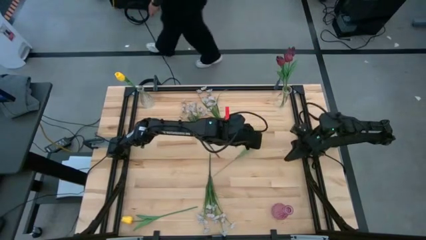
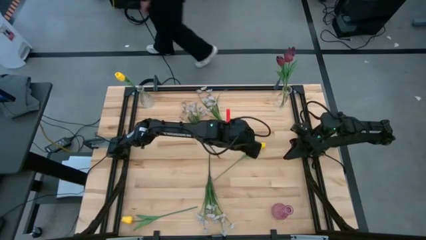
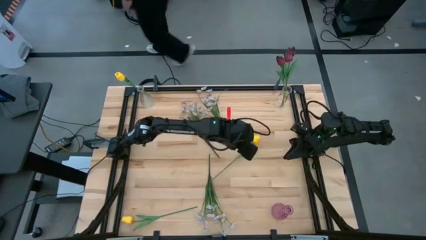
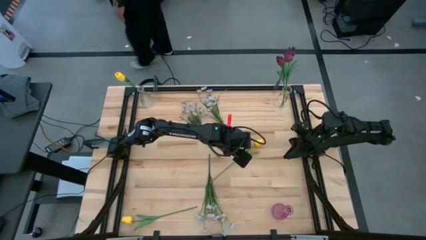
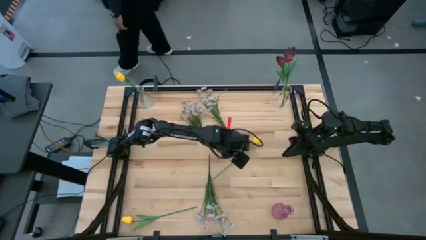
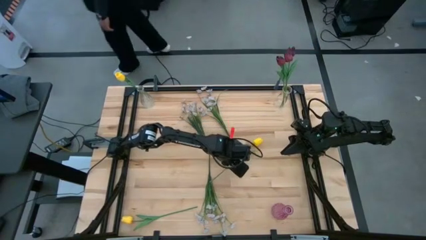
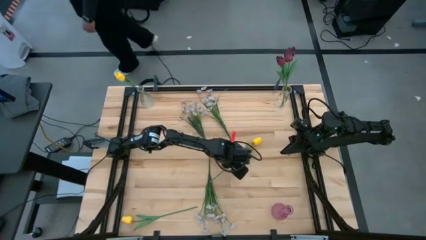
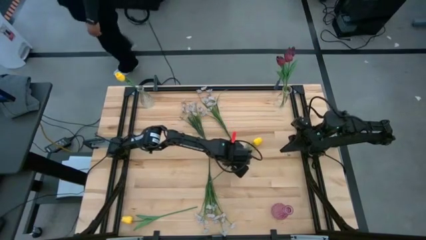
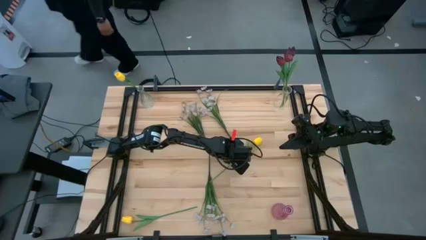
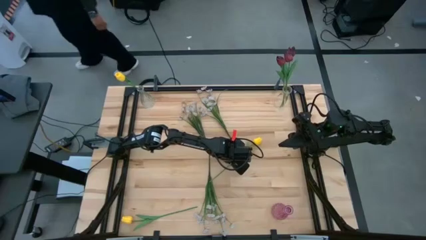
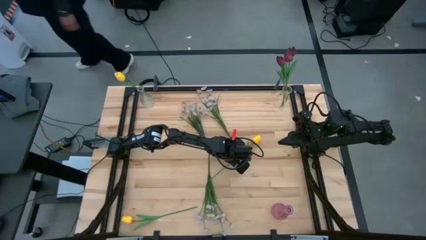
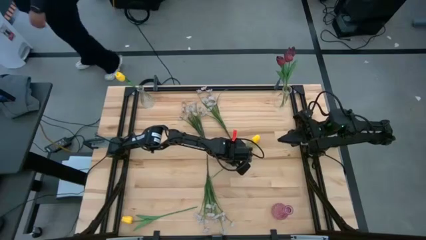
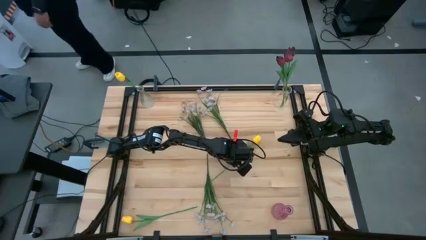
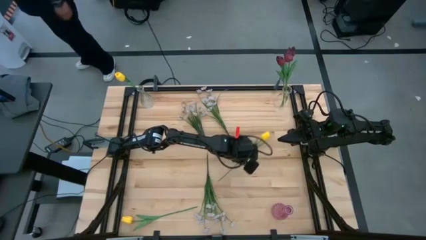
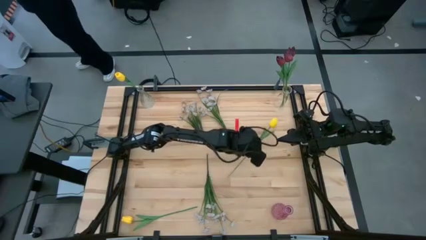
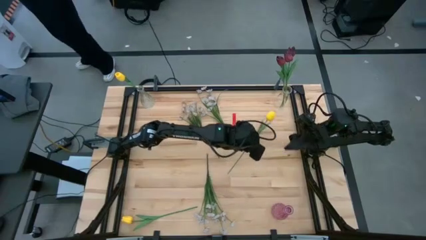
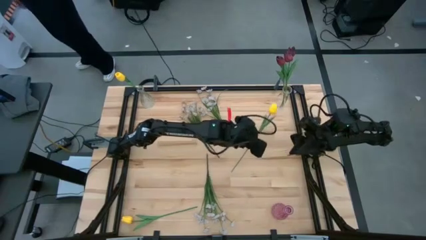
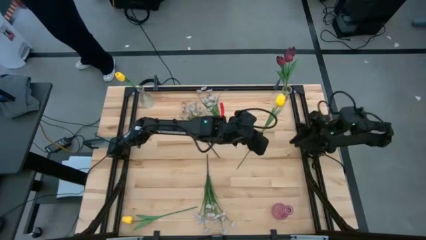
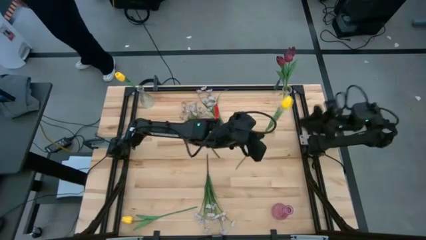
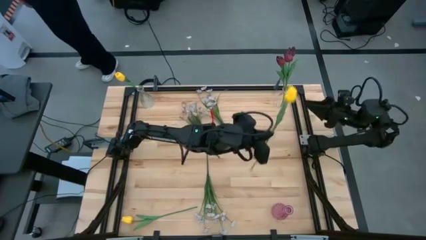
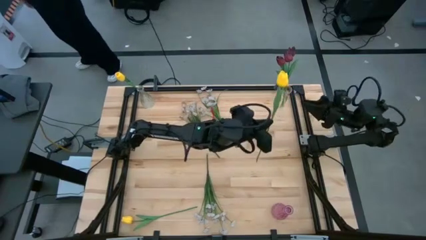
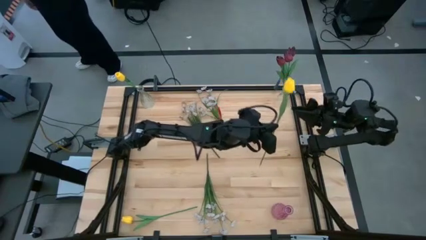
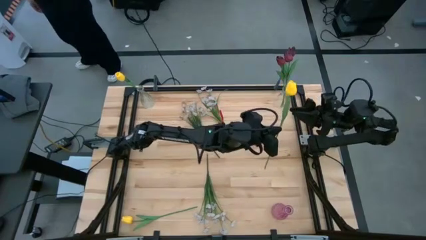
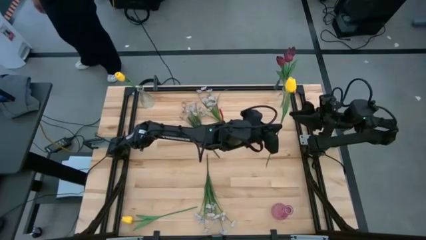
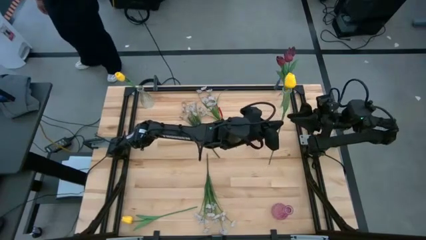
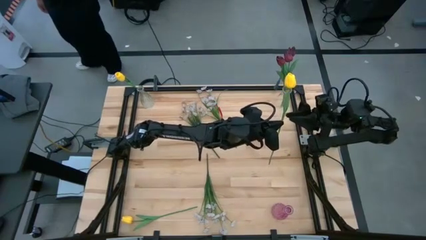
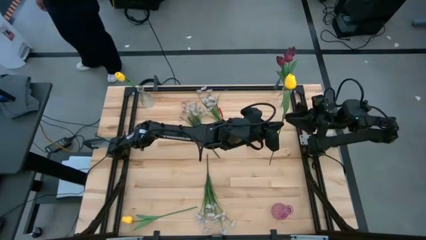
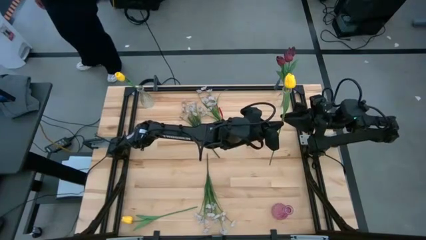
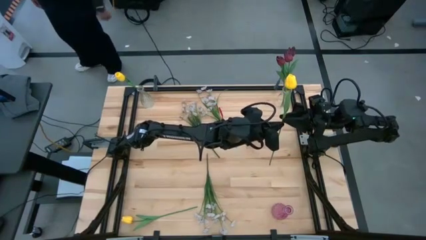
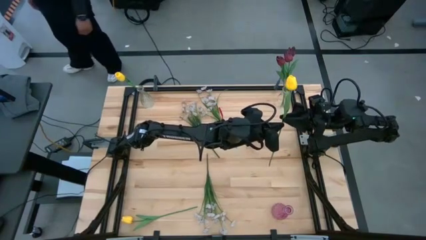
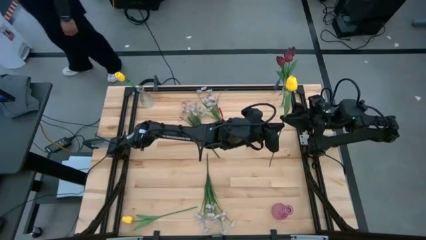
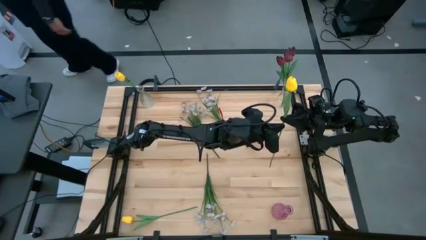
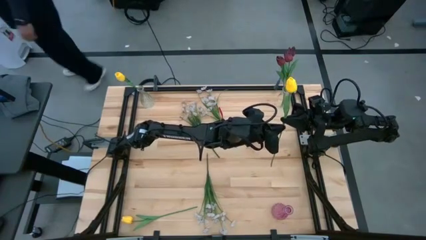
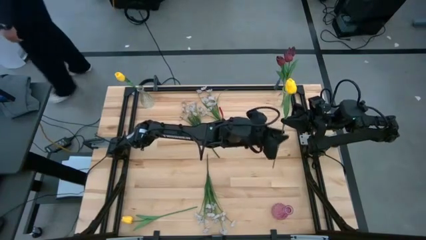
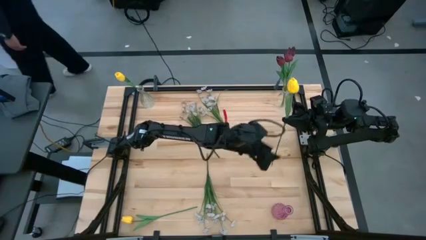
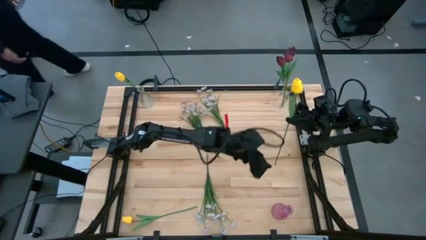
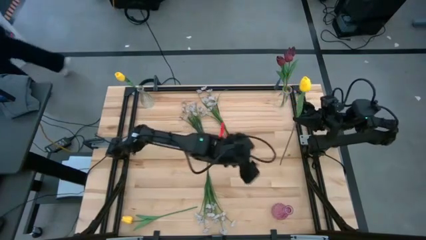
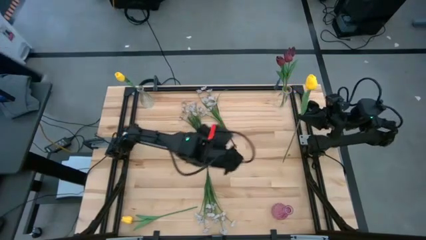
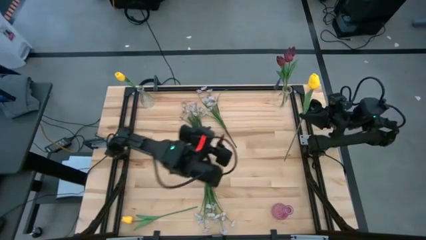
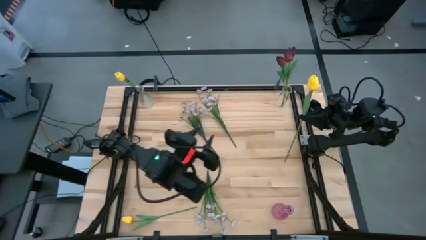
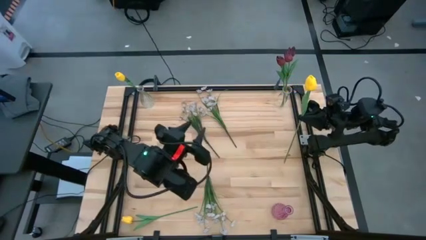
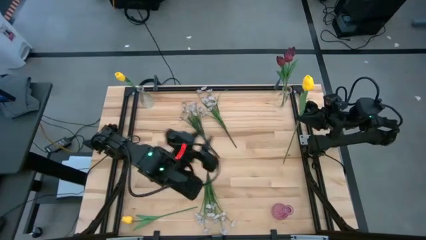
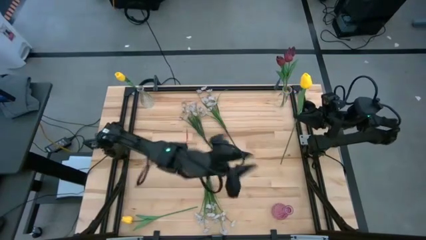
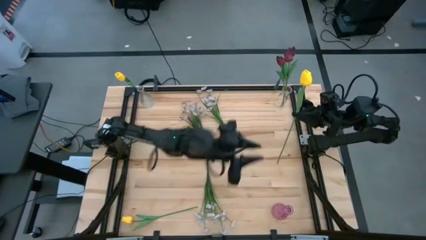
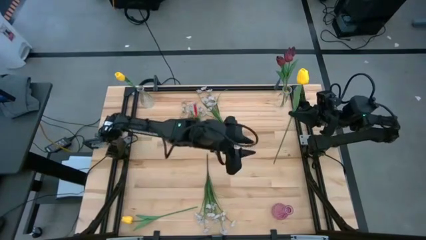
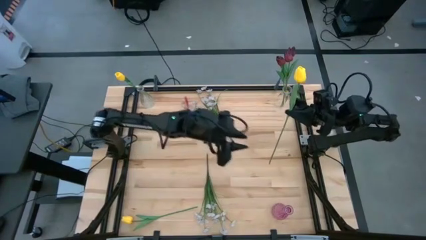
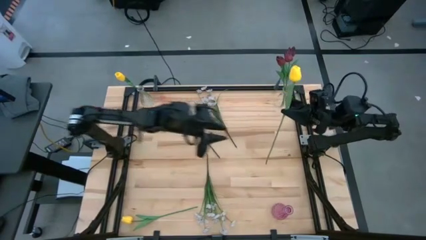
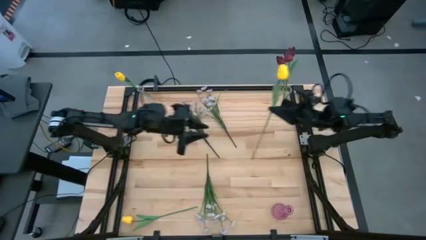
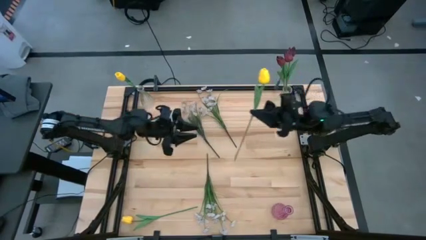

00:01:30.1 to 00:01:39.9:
Task: Sort flowers into vase by color
Put the top yellow flower into the left transparent vase

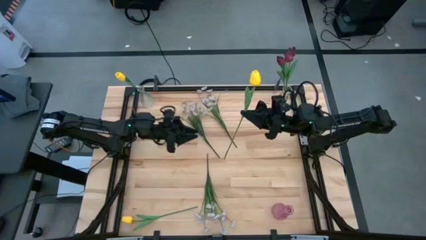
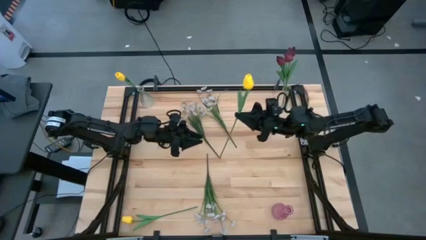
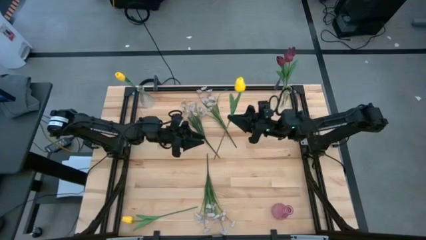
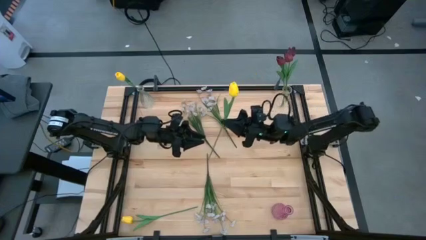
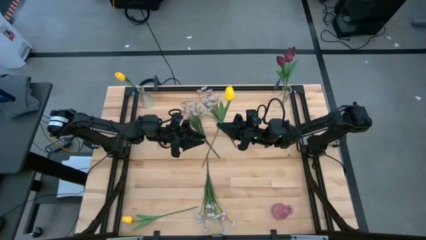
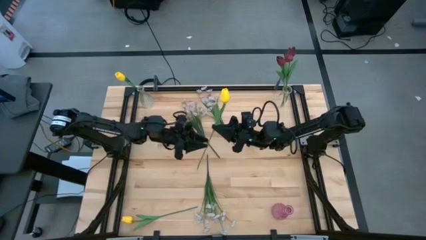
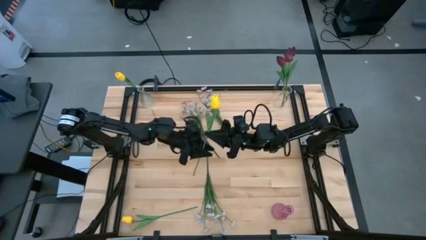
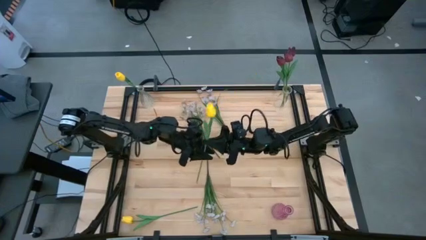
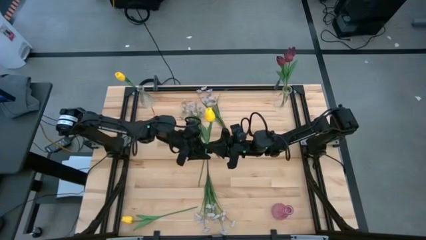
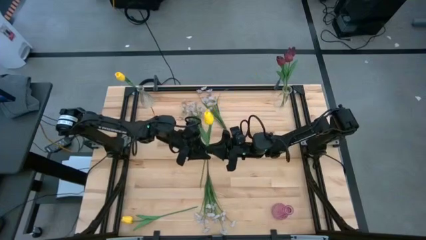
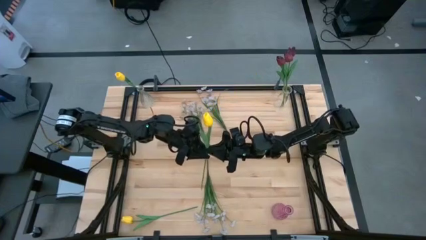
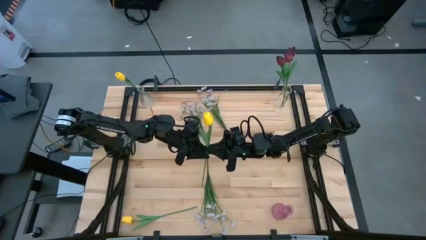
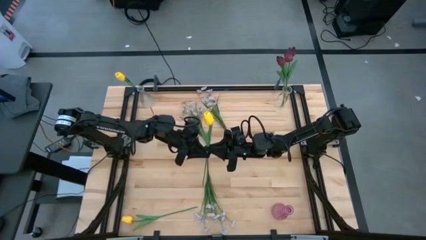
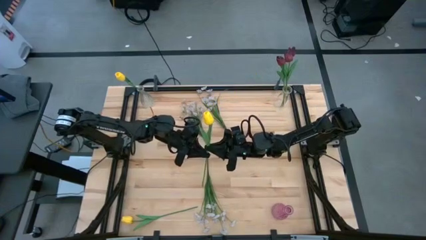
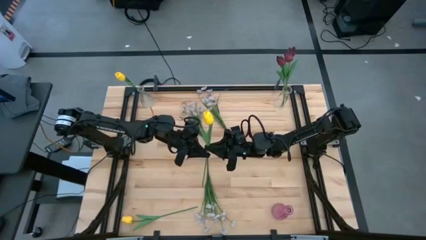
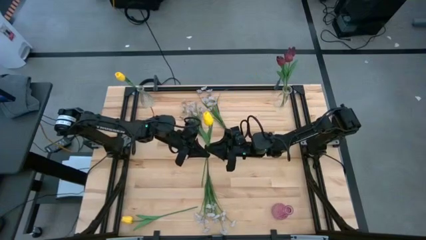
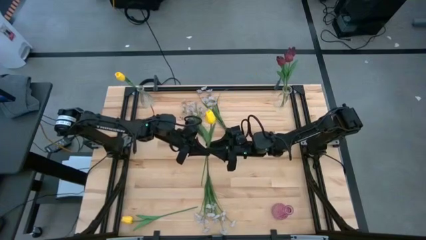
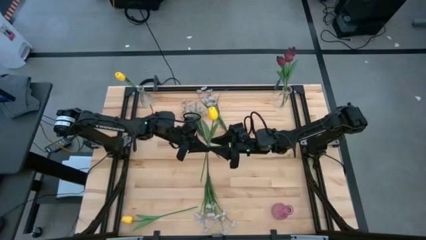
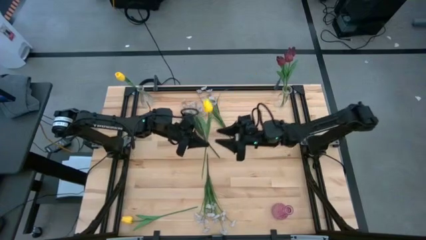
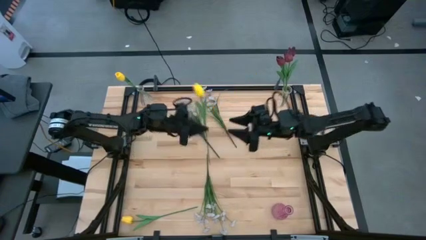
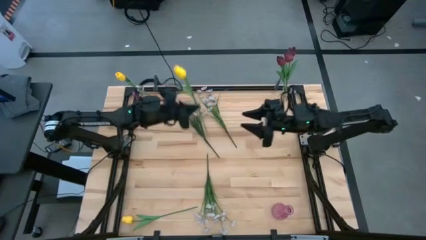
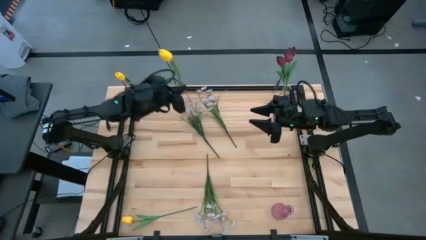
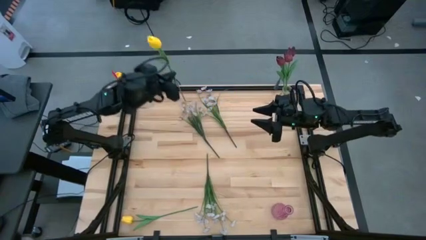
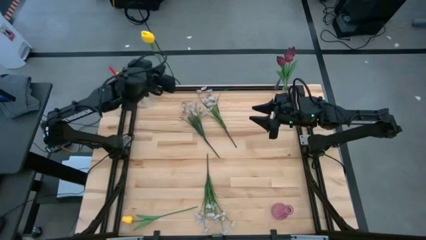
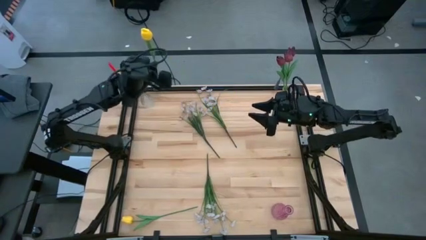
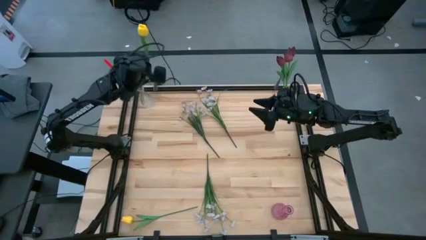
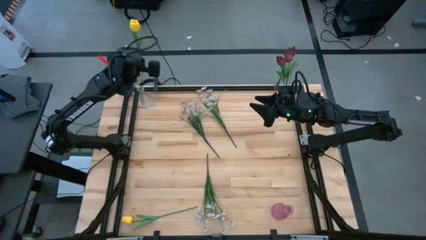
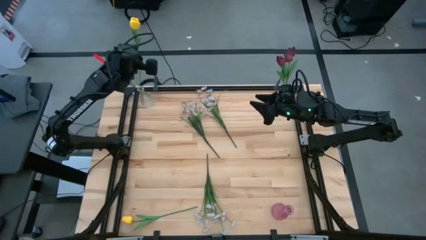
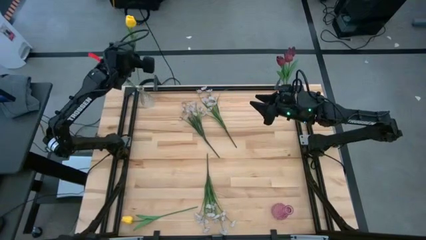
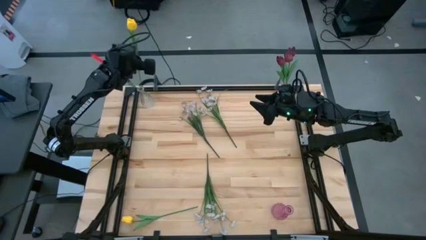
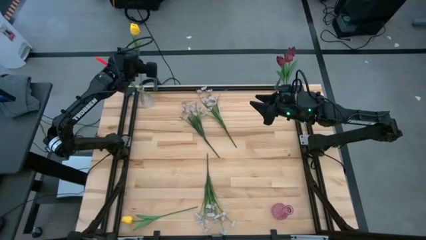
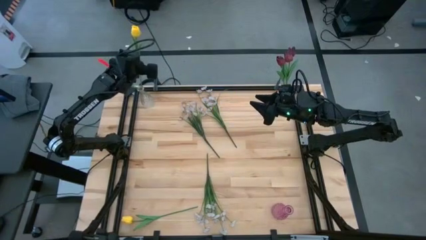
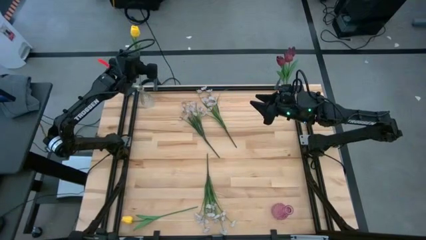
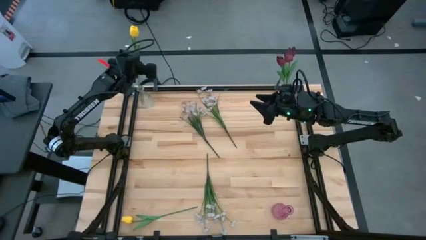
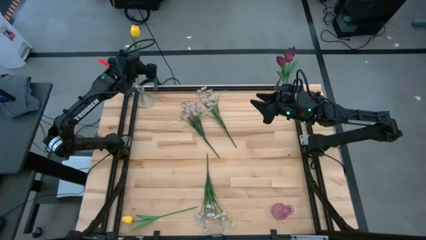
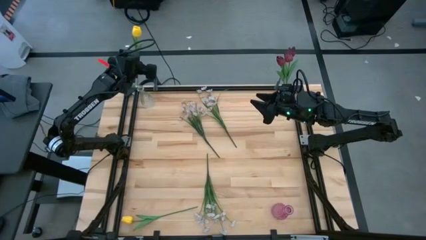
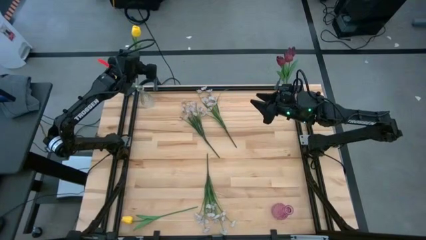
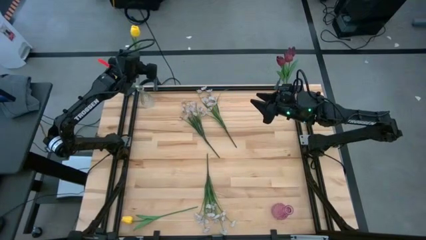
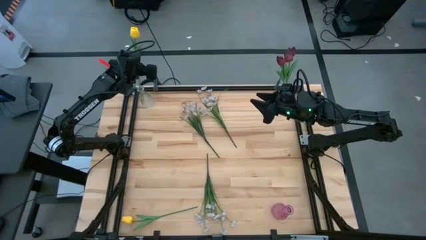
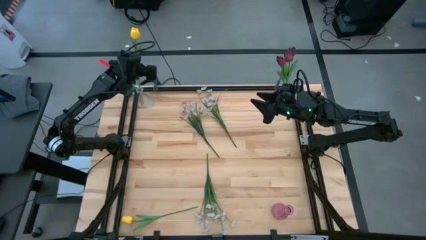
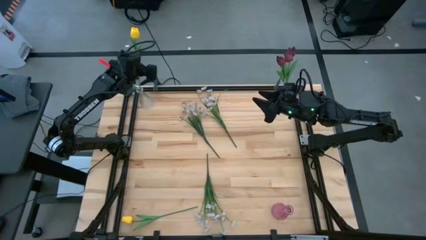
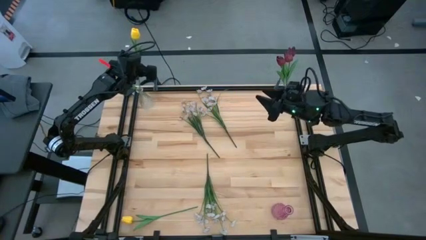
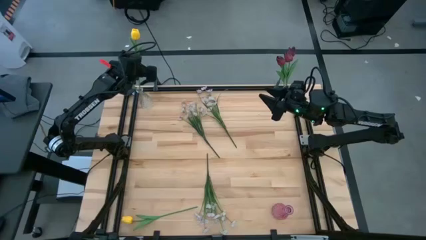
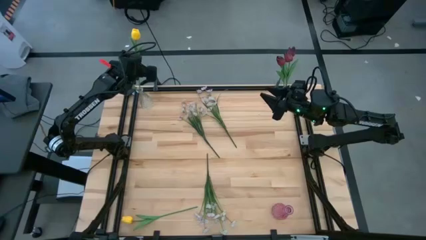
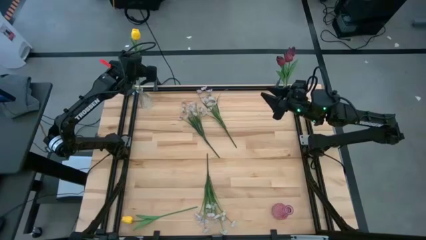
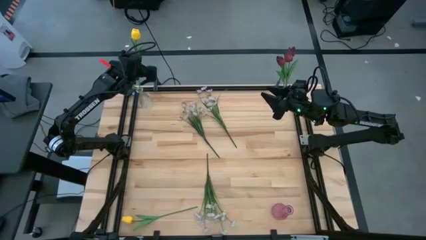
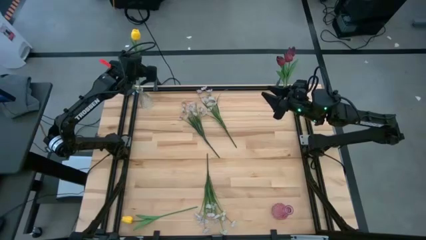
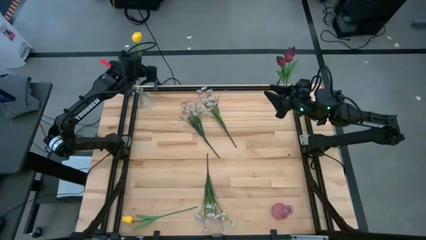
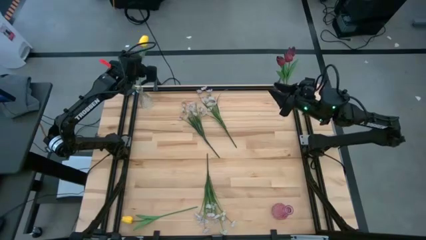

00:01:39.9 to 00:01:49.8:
Put the top yellow flower into the left transparent vase
